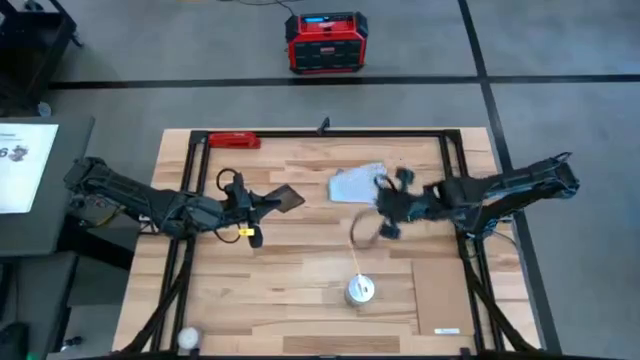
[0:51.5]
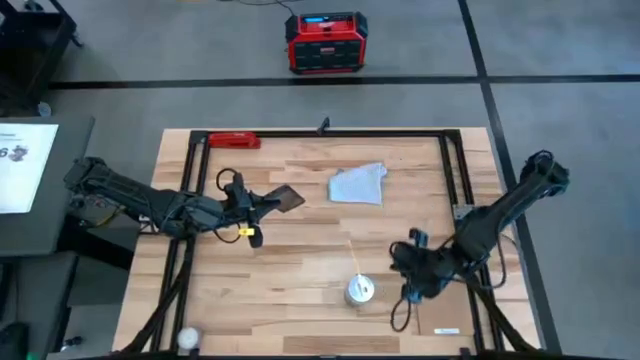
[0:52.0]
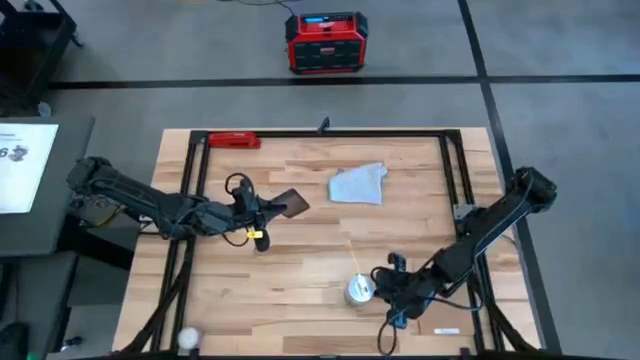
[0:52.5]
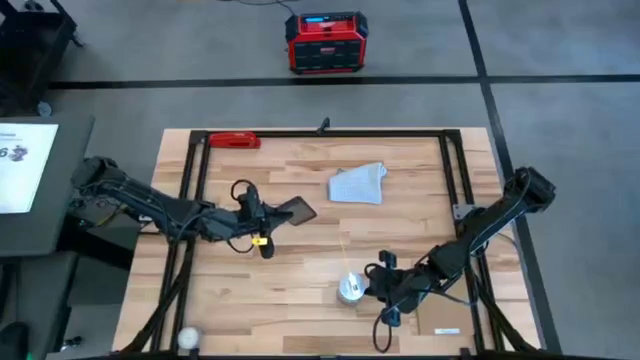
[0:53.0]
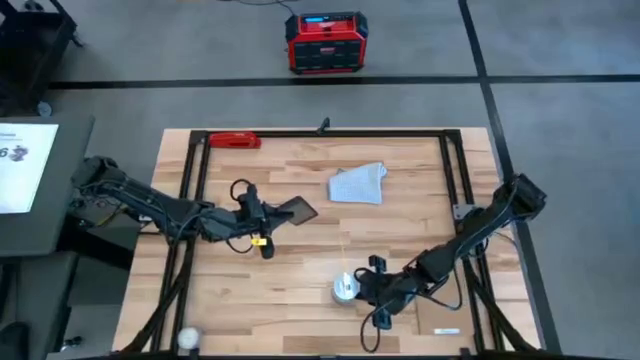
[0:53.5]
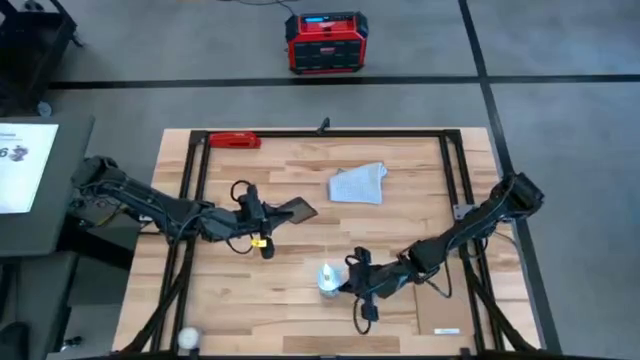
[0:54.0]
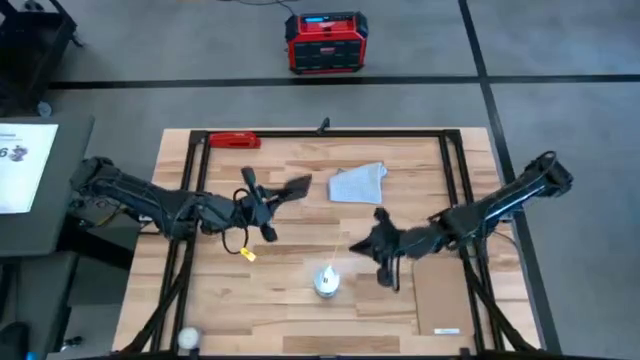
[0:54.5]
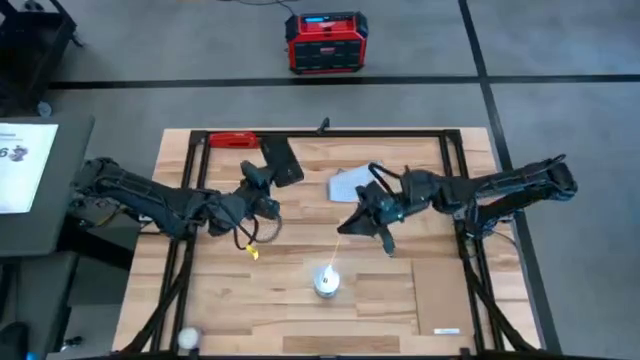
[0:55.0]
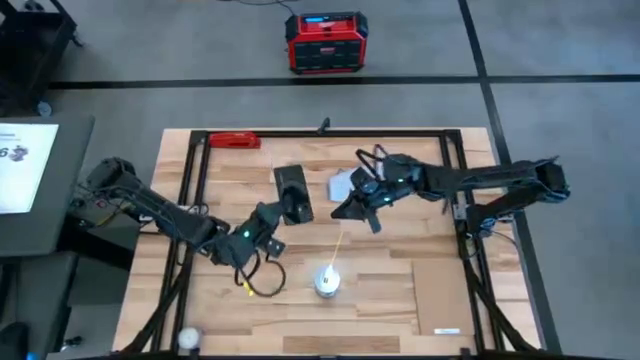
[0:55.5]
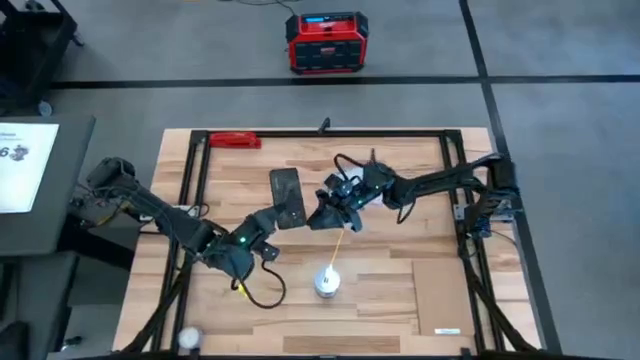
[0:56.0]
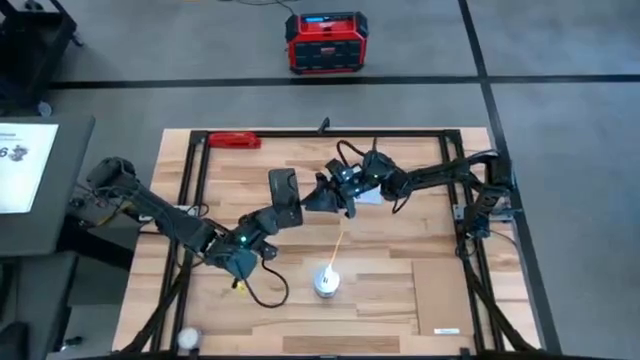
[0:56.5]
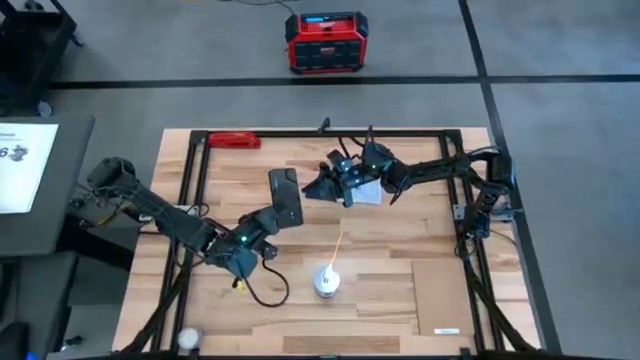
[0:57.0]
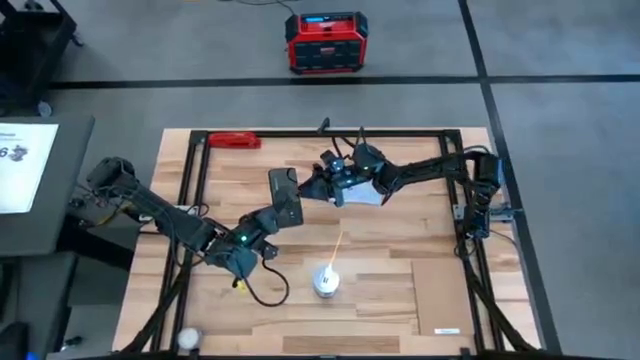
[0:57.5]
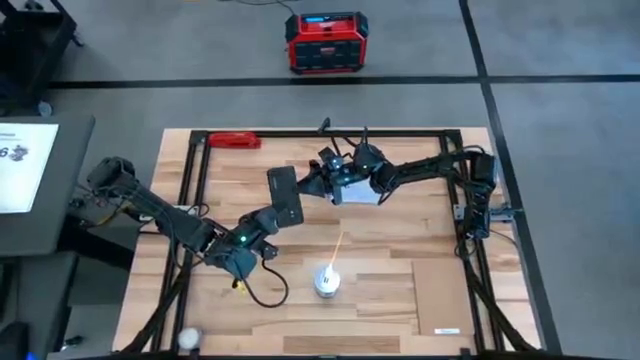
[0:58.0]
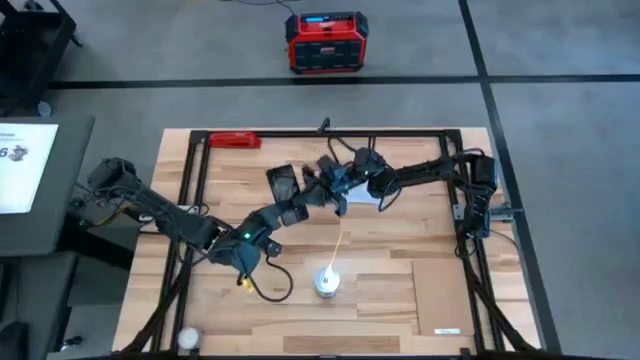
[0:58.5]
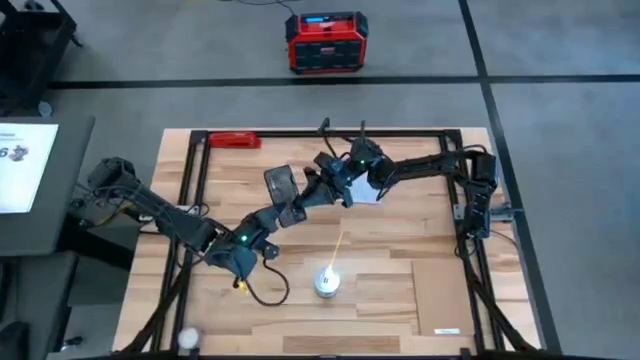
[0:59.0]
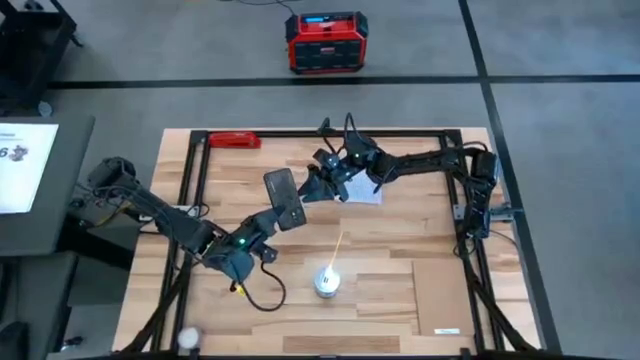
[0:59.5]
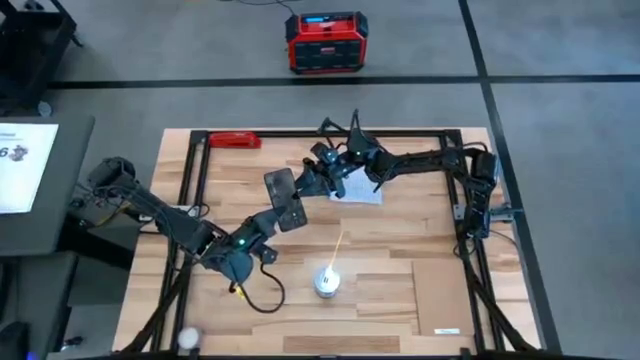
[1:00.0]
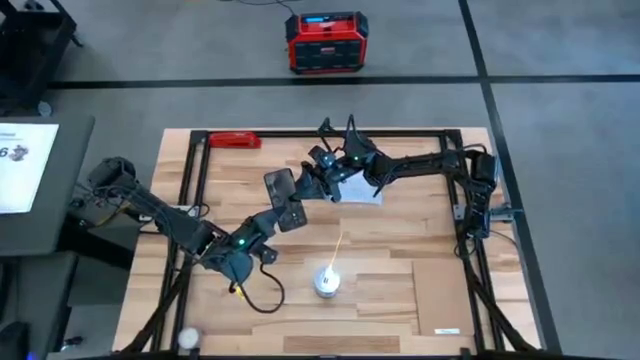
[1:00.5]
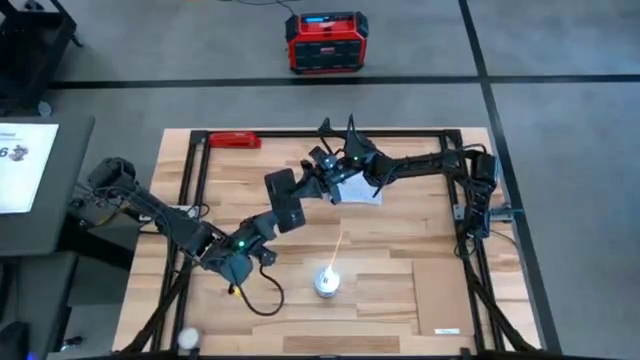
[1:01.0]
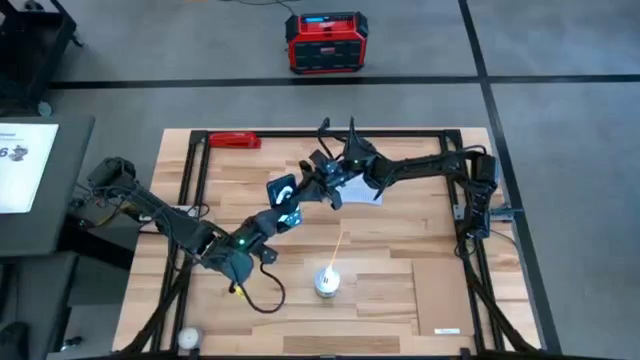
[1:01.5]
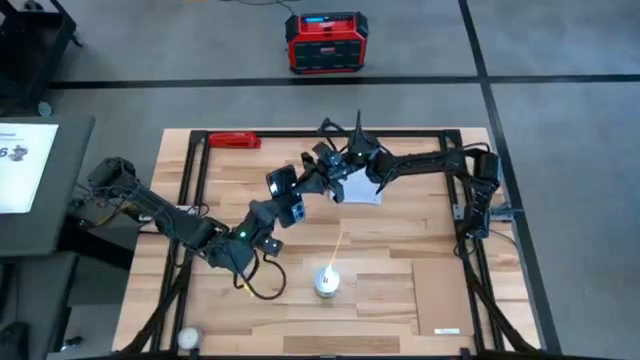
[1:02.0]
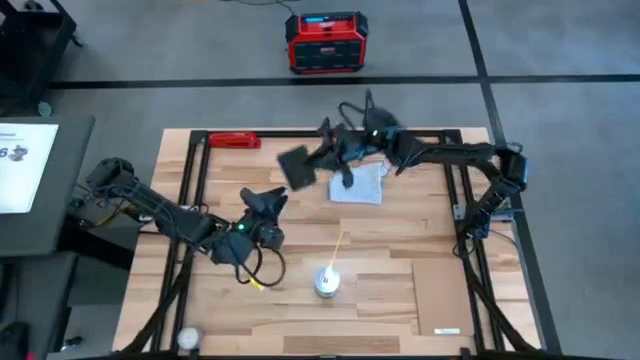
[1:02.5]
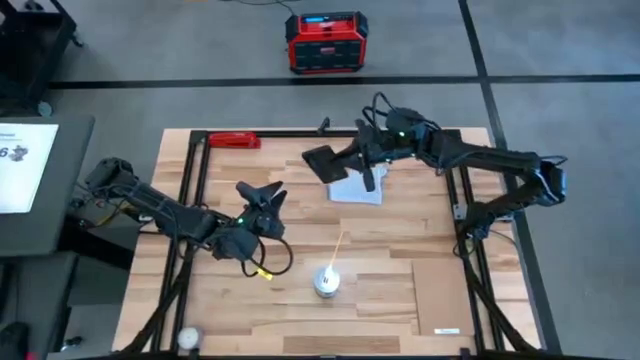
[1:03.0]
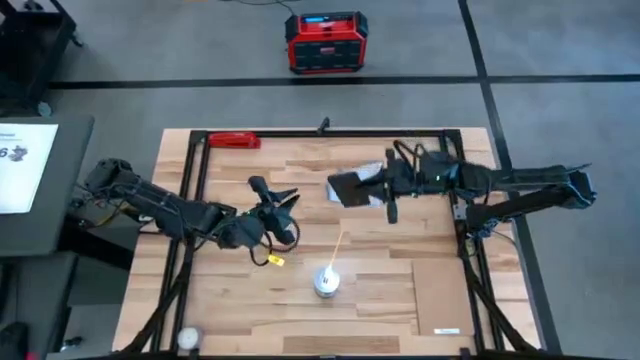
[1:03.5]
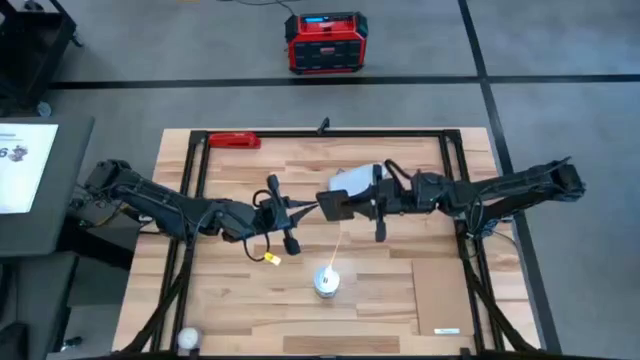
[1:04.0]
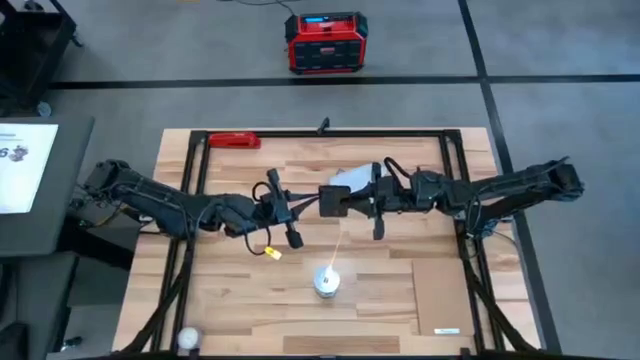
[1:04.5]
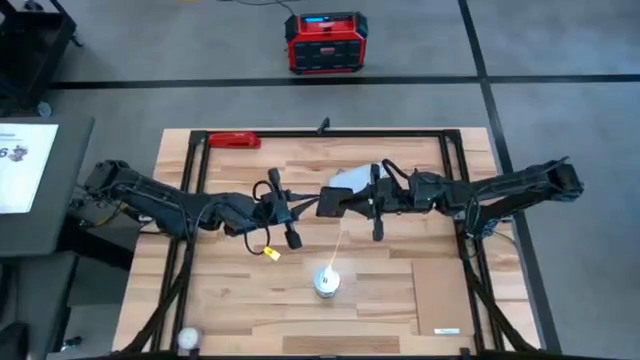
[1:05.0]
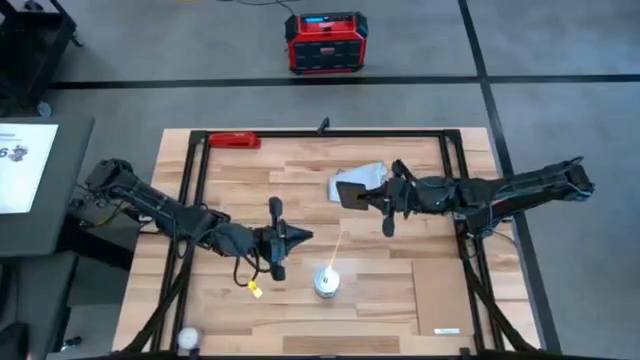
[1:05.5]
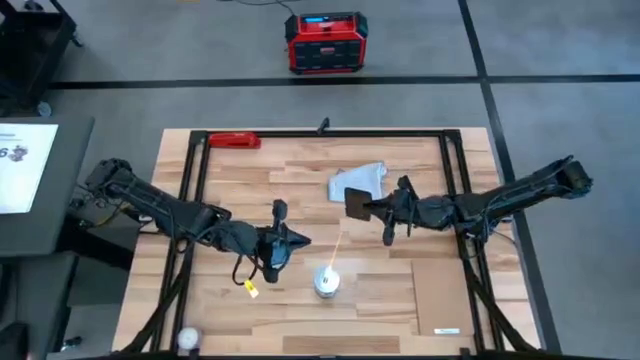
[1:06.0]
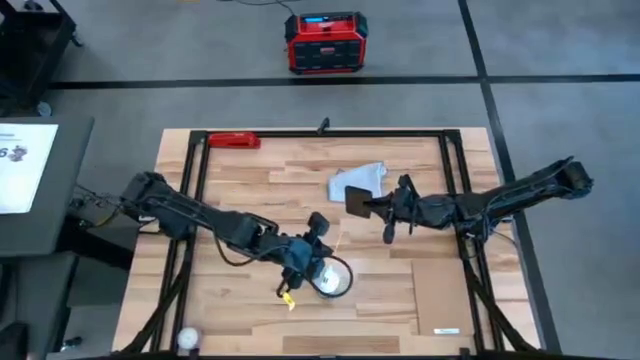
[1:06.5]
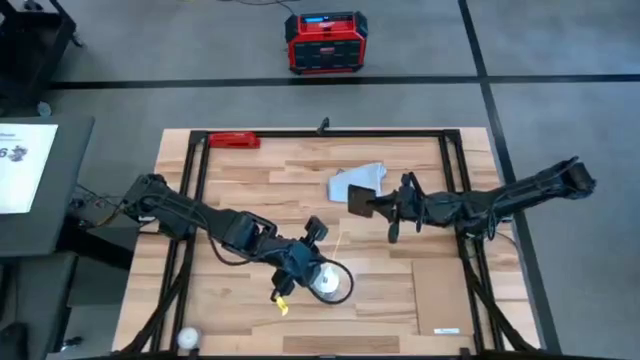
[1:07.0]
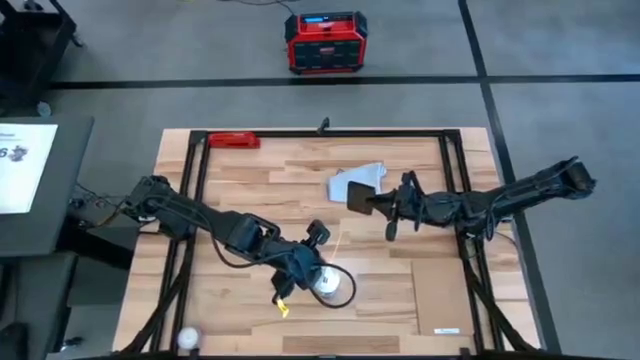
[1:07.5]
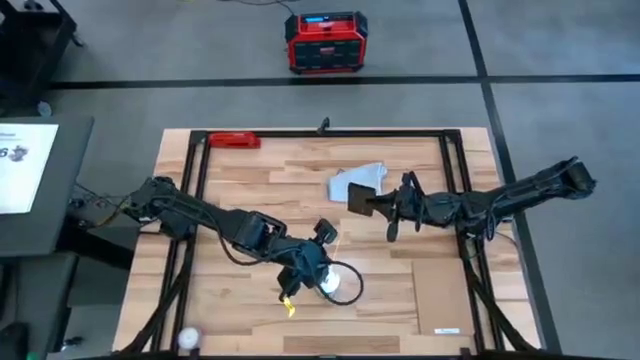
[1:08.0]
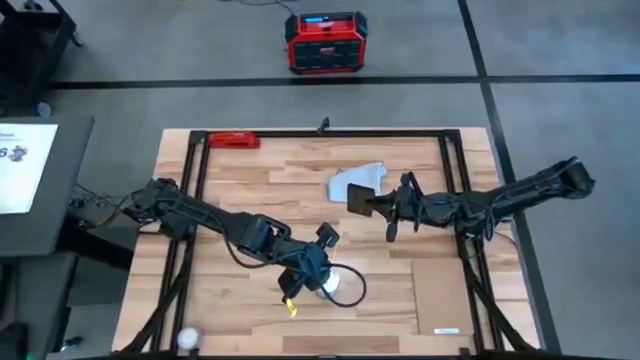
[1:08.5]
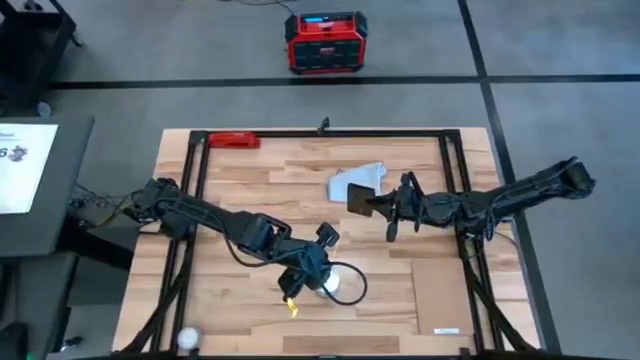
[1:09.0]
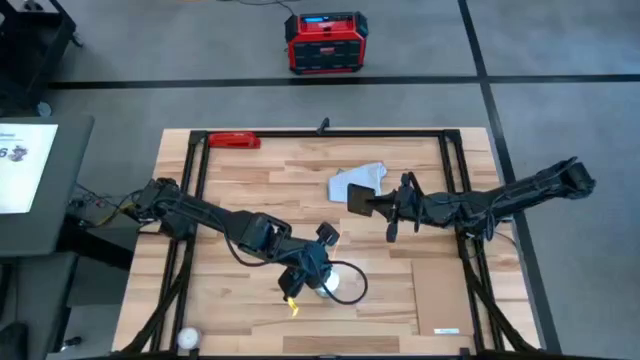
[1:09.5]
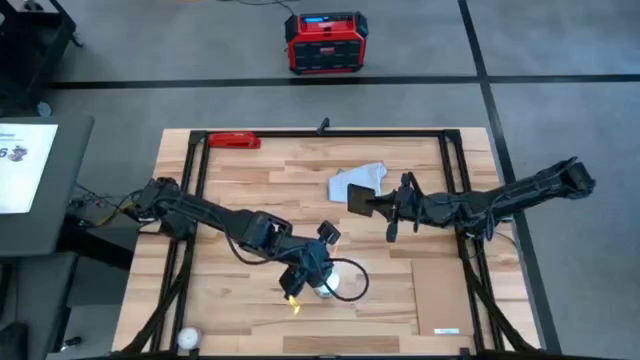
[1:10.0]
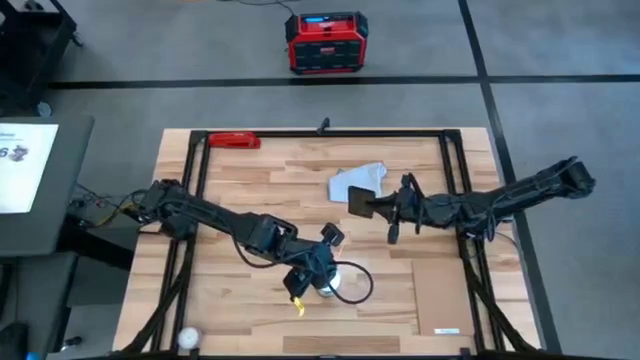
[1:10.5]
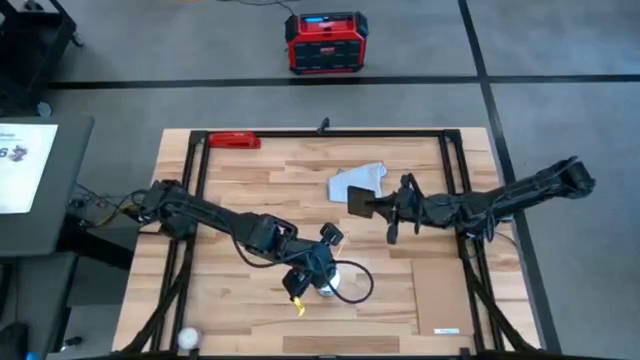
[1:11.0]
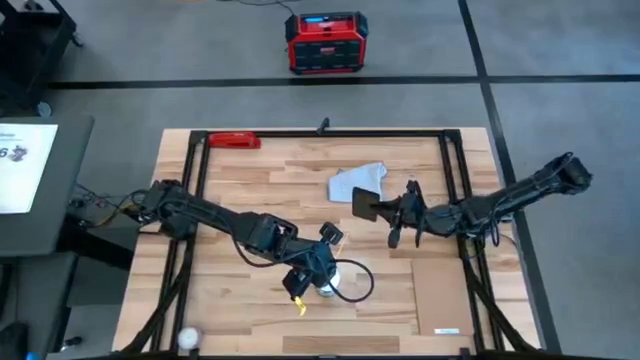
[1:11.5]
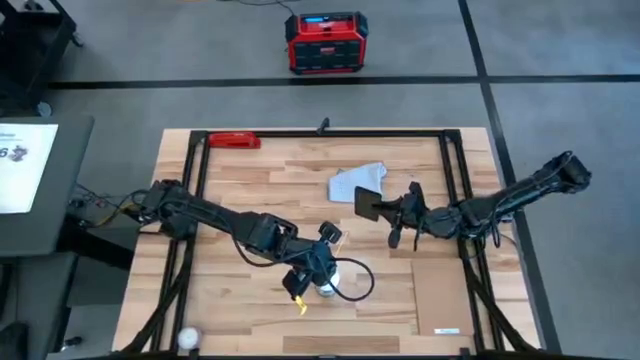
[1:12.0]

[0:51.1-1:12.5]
Task: Apply microfiber cloth
Spray the back of the black phone with the spray bottle
